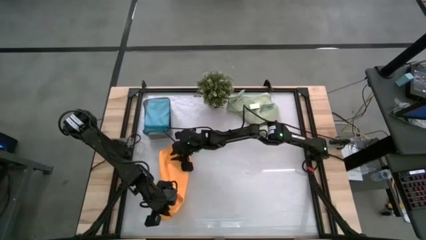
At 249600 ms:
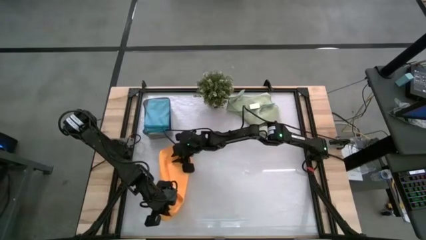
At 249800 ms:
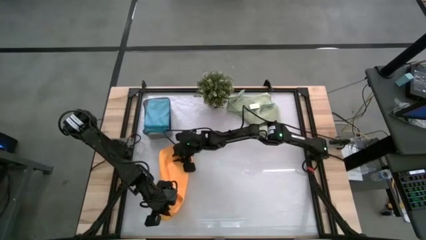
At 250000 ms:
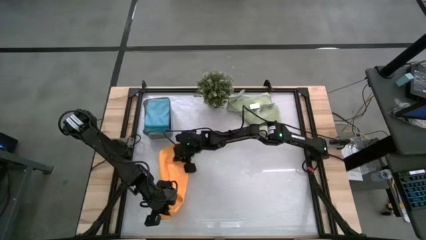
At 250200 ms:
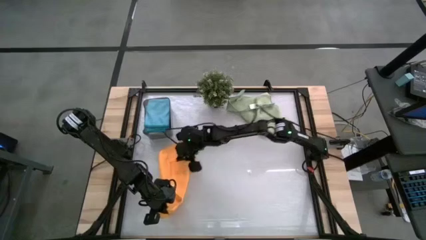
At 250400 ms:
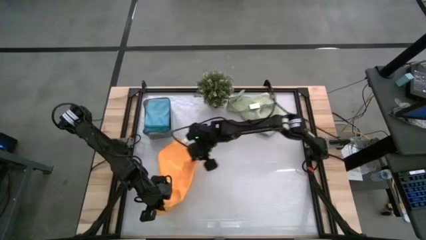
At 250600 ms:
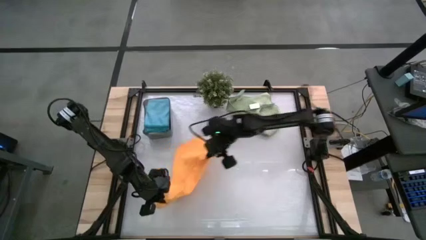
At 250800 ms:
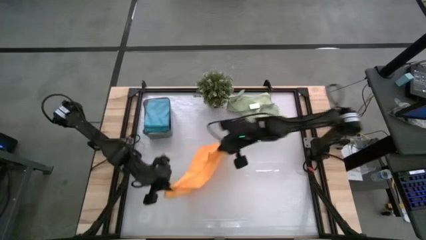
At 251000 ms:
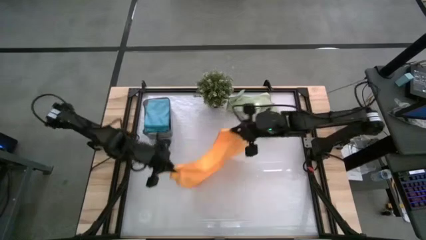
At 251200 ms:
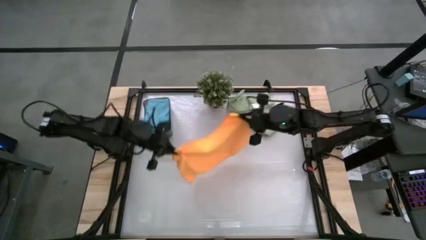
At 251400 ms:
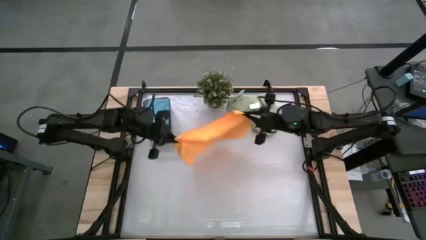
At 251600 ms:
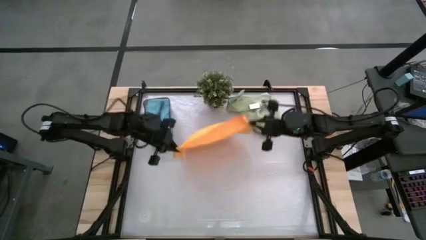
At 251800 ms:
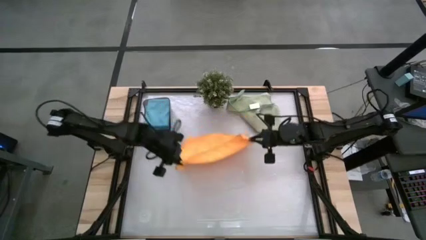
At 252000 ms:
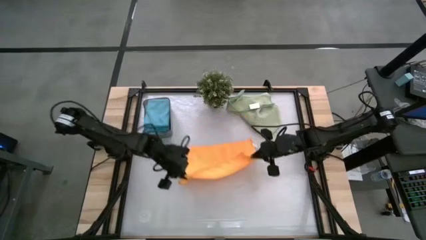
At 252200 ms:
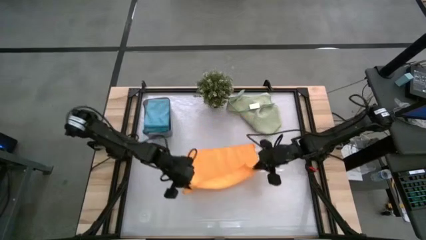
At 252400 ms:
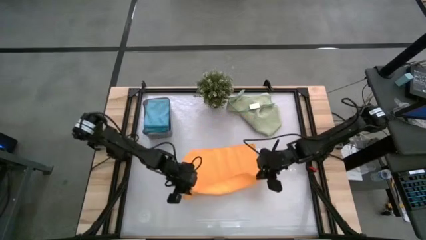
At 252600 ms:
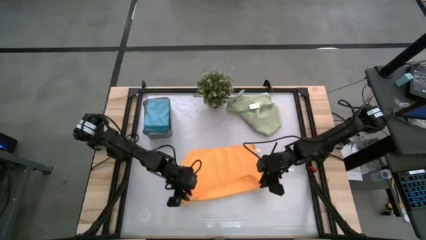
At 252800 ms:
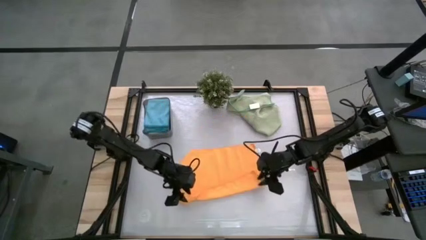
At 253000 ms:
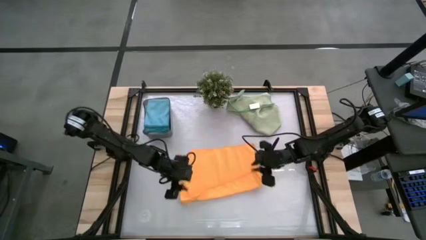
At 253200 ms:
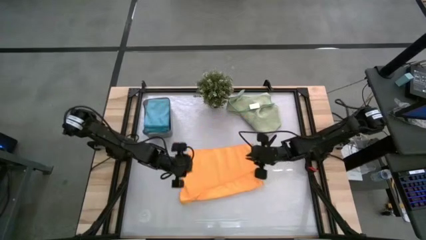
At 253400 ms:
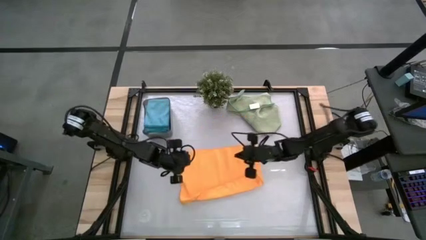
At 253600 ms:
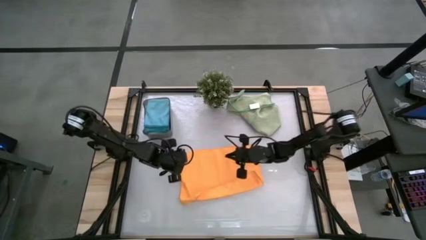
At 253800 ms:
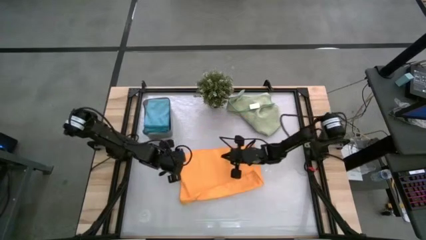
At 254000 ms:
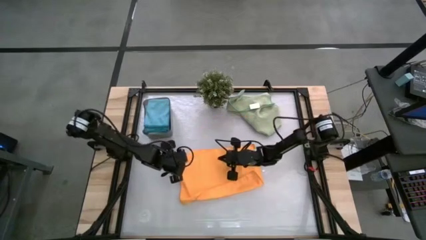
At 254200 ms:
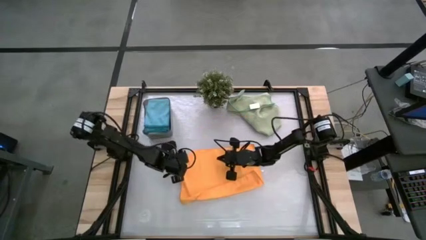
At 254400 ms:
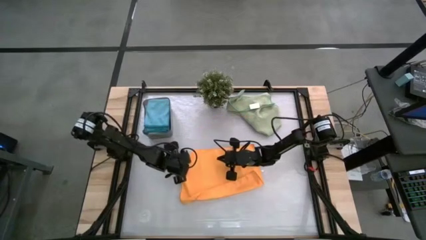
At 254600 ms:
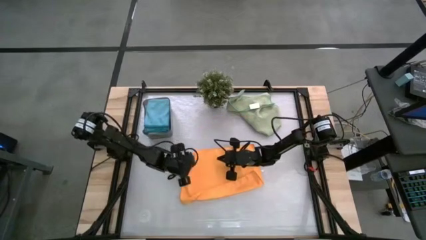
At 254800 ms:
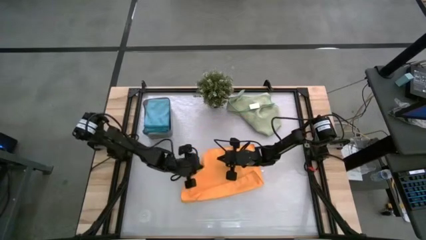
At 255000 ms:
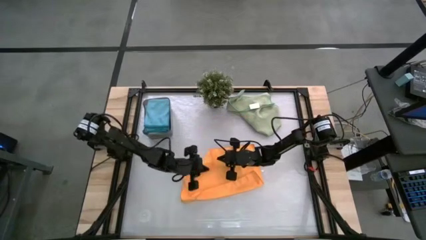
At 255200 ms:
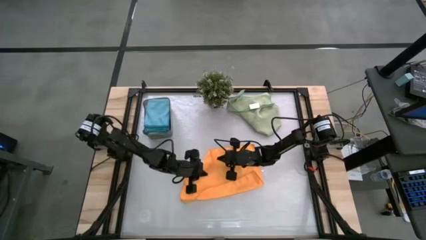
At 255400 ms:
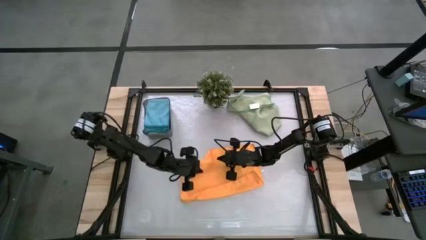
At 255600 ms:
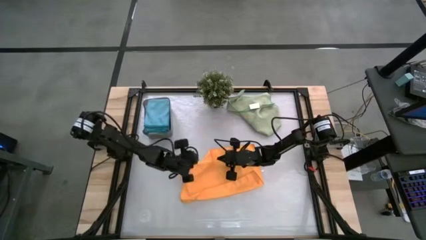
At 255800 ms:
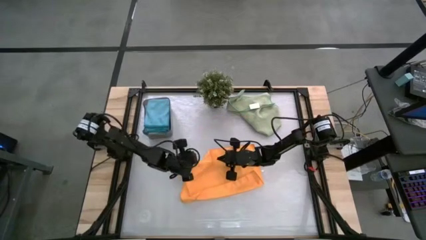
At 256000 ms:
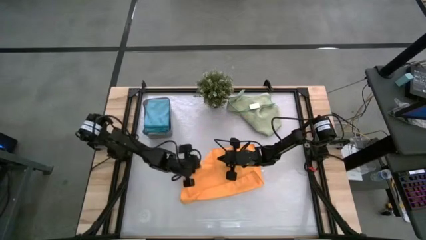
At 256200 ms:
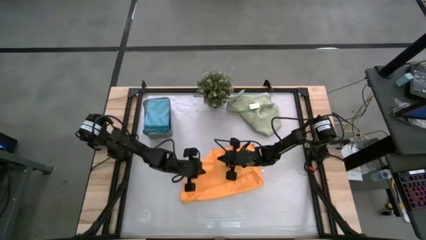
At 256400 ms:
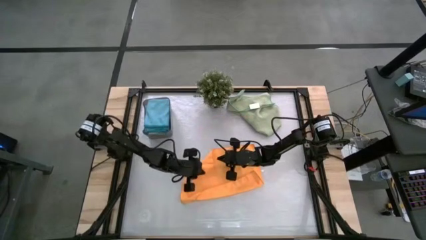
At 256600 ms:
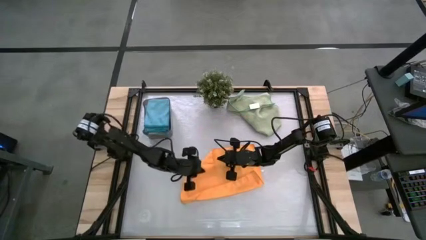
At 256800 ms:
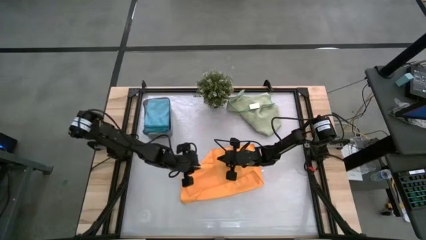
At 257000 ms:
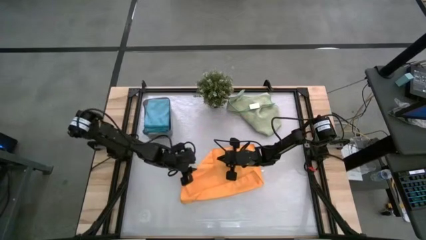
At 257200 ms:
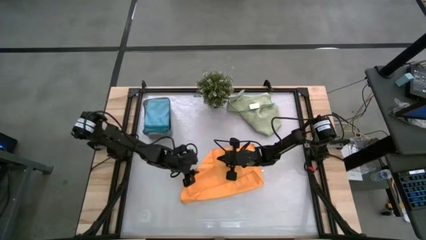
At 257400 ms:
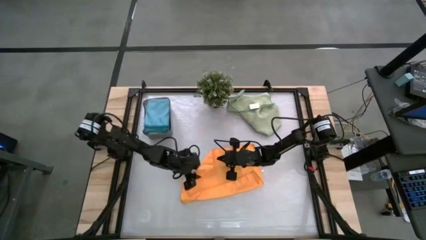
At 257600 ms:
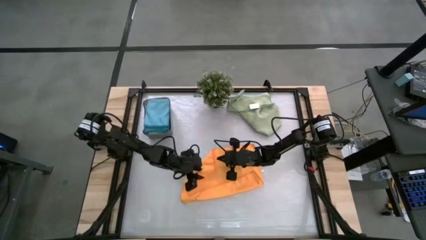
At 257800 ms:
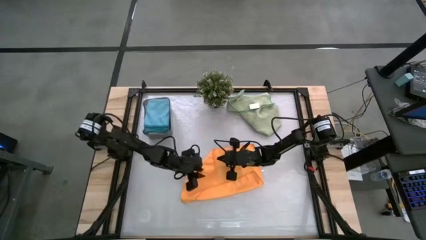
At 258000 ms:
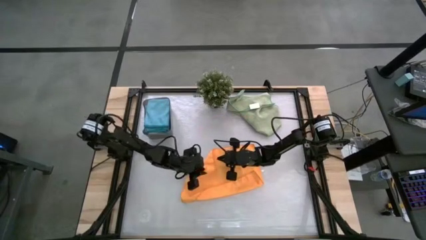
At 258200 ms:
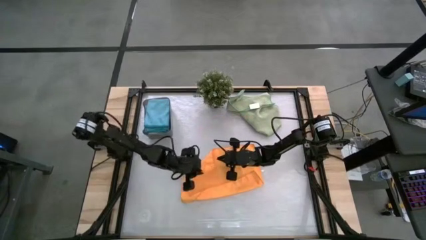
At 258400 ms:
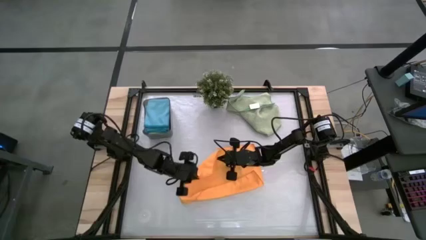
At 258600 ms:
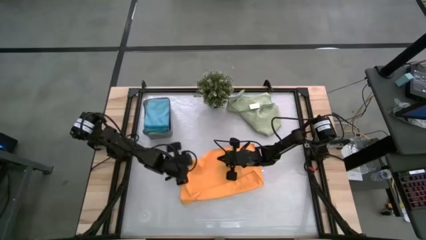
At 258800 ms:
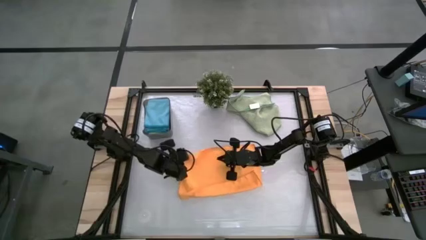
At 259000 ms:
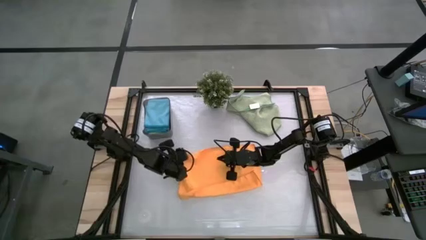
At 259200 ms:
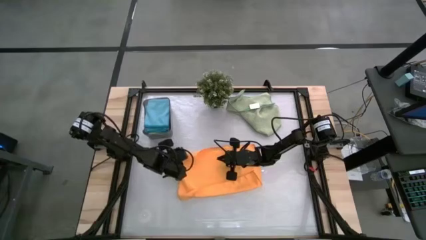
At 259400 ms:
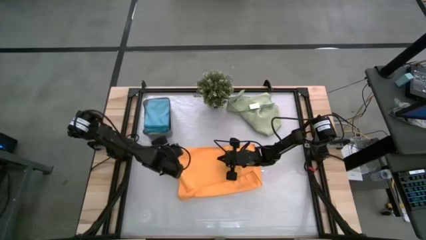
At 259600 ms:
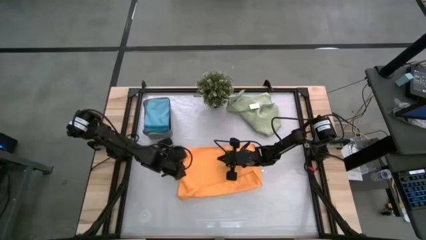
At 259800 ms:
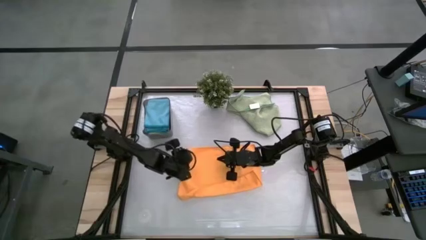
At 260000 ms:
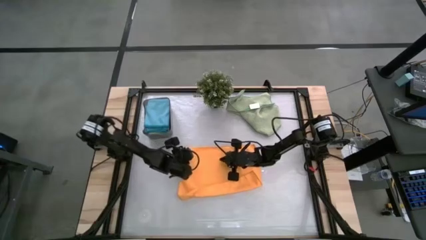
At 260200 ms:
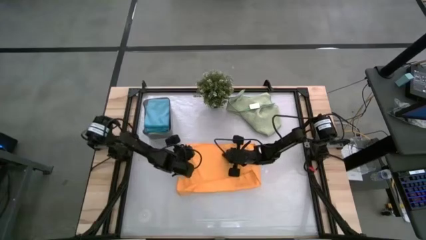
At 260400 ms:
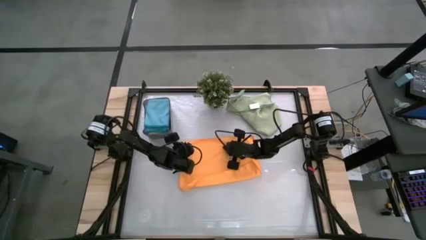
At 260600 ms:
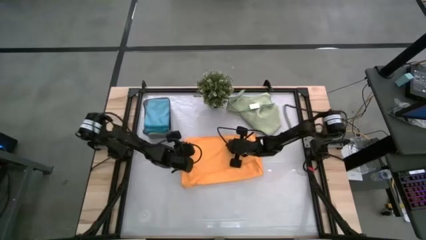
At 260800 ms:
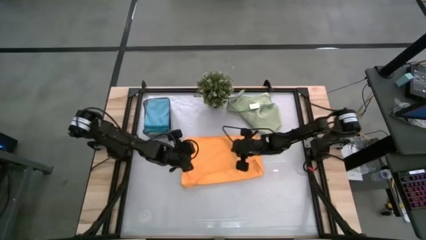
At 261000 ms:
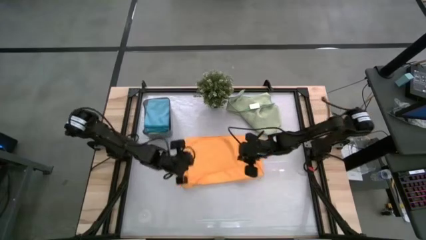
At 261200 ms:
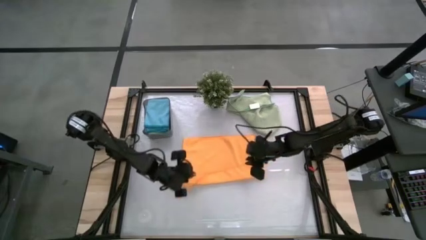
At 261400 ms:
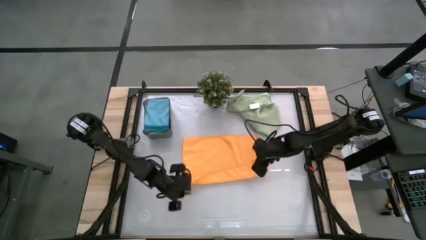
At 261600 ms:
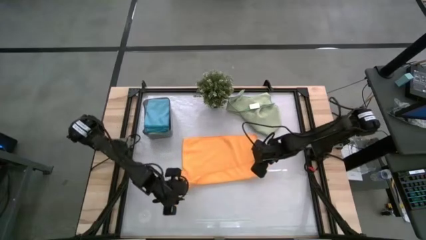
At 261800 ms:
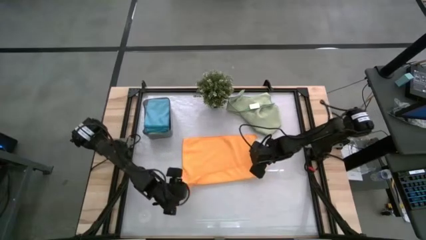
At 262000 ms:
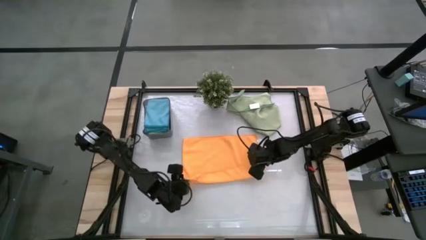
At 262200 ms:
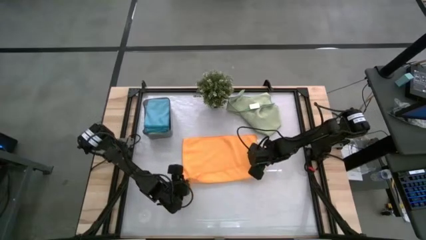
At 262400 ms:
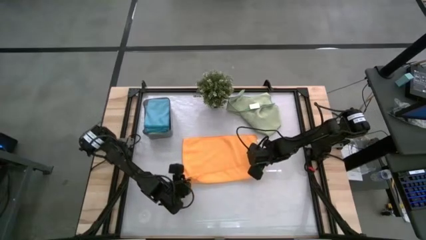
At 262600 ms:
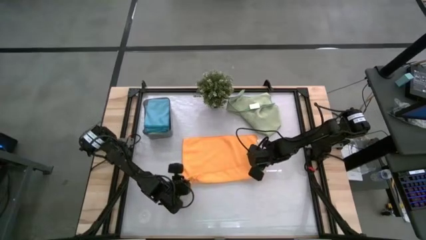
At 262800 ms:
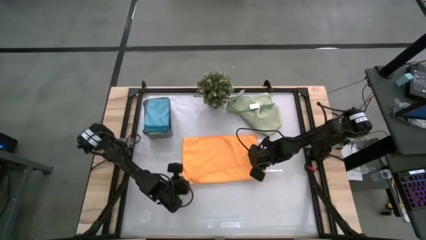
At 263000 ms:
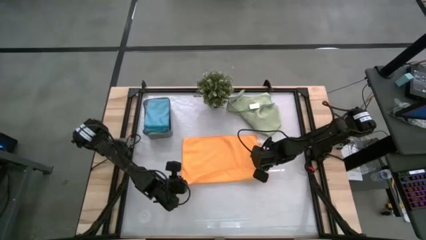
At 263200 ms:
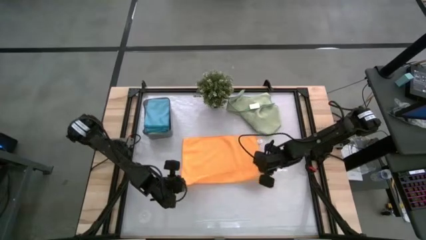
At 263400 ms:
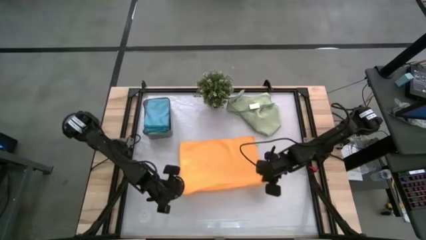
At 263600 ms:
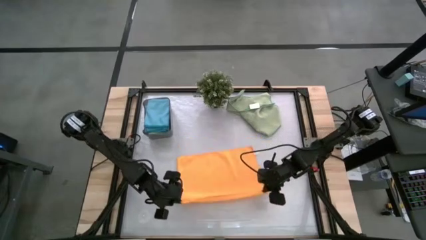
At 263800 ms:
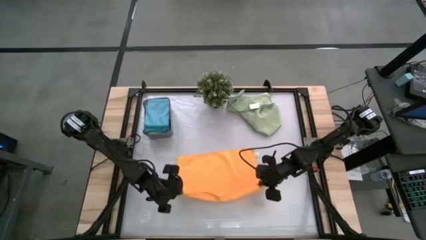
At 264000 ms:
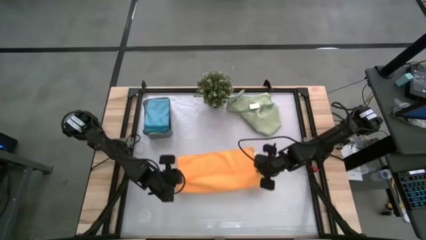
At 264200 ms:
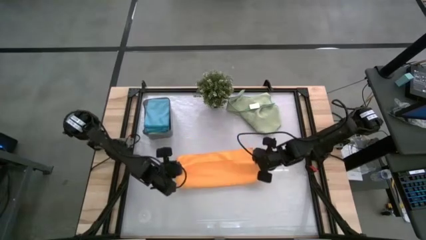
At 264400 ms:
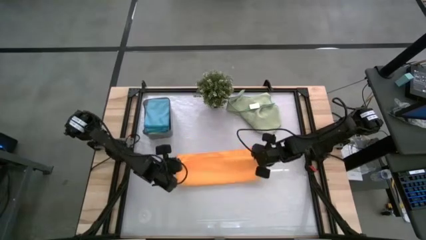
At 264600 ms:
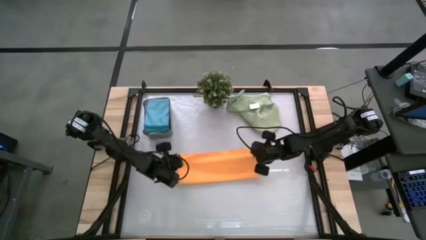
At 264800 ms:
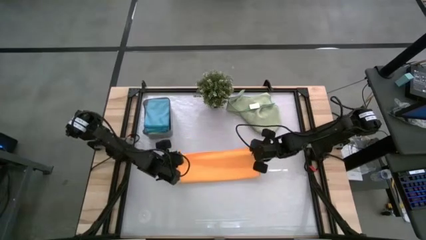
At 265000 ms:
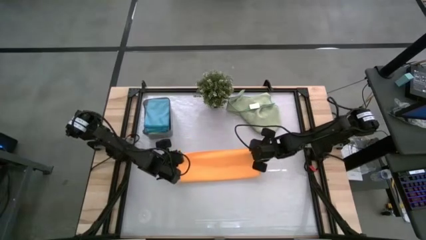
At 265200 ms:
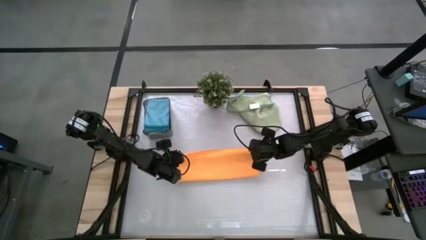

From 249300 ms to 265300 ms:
Task: Fold microfiber towels
Fold the orange microfiber cloth
